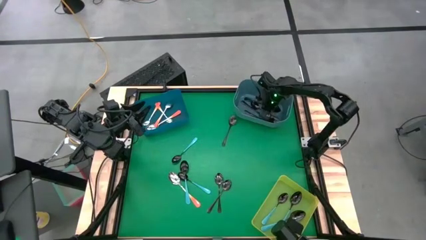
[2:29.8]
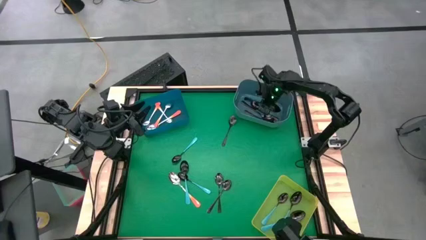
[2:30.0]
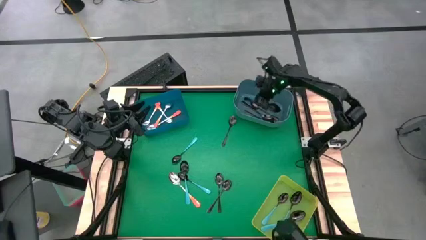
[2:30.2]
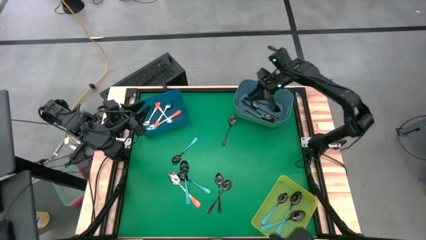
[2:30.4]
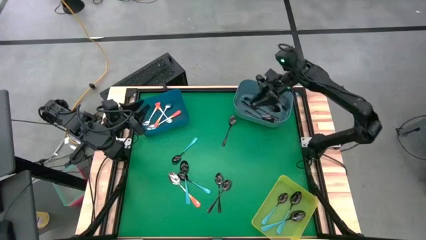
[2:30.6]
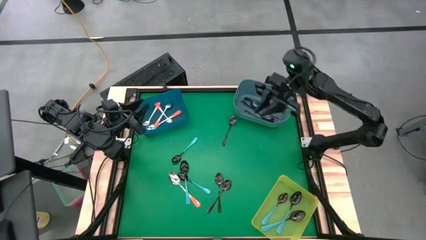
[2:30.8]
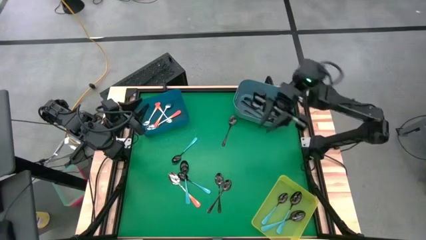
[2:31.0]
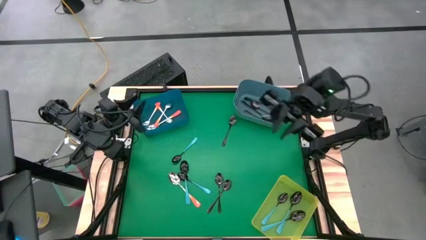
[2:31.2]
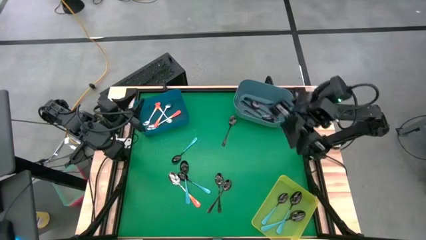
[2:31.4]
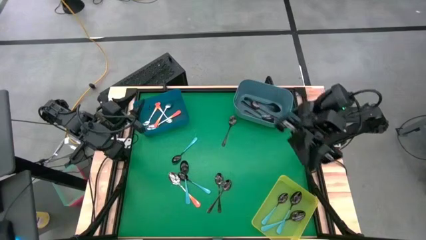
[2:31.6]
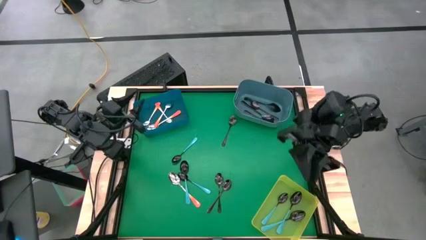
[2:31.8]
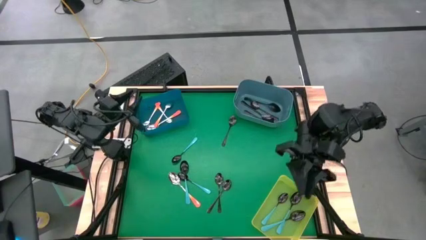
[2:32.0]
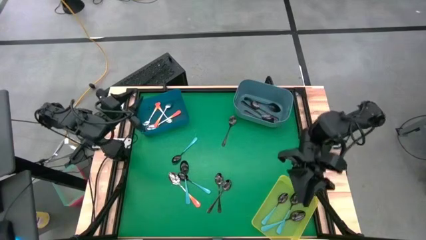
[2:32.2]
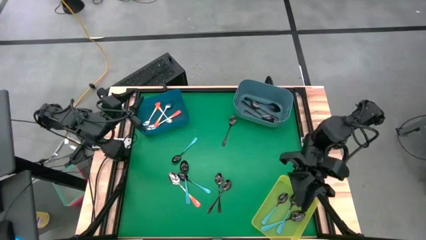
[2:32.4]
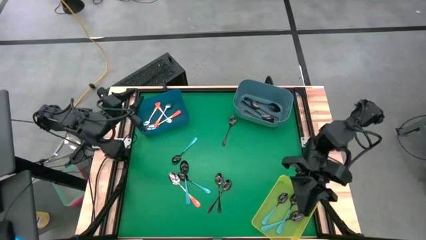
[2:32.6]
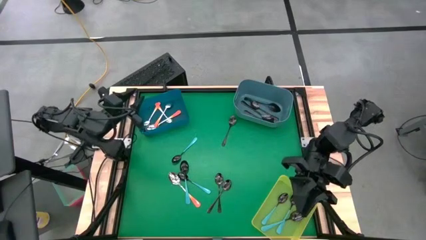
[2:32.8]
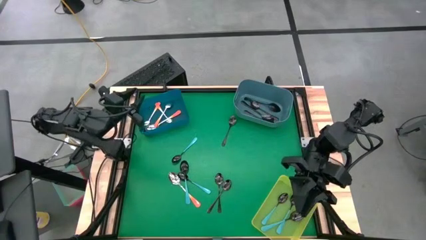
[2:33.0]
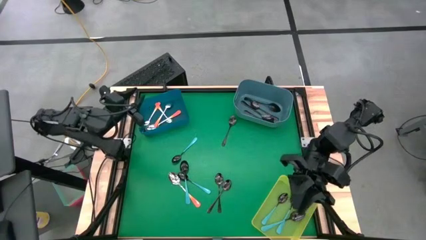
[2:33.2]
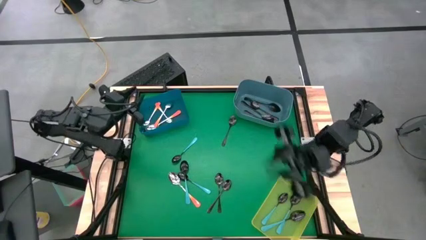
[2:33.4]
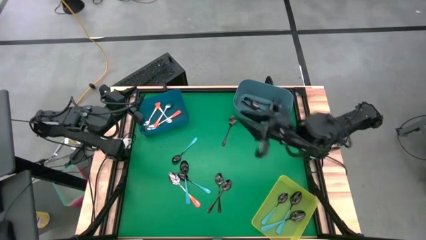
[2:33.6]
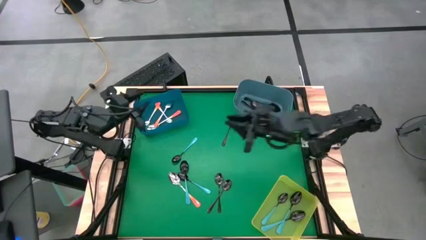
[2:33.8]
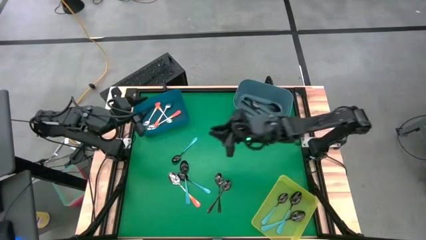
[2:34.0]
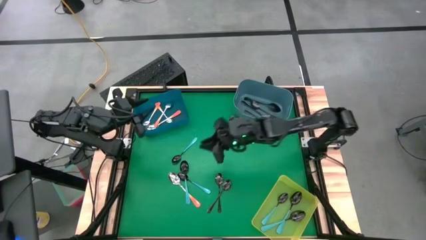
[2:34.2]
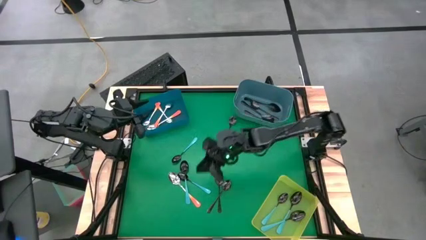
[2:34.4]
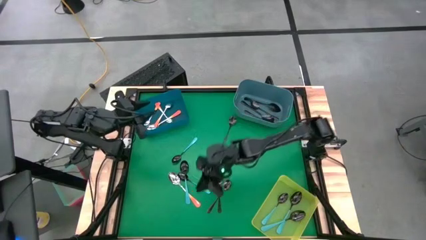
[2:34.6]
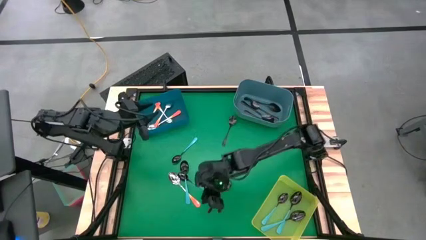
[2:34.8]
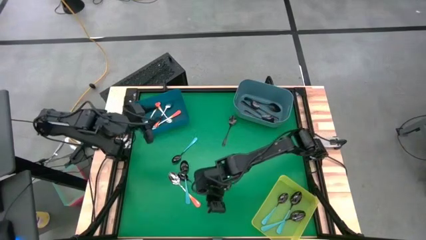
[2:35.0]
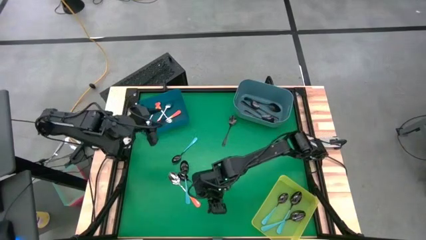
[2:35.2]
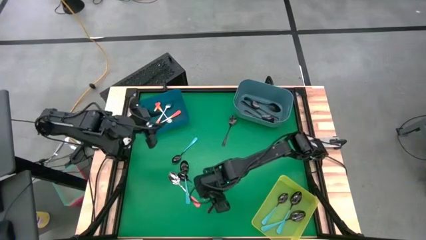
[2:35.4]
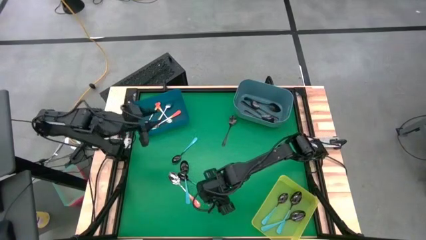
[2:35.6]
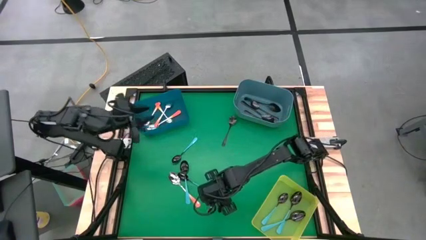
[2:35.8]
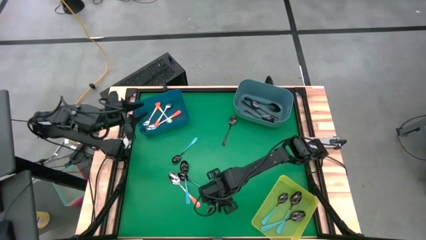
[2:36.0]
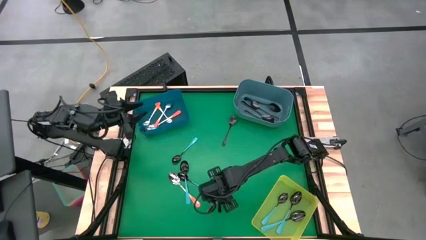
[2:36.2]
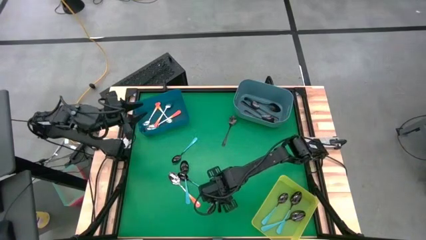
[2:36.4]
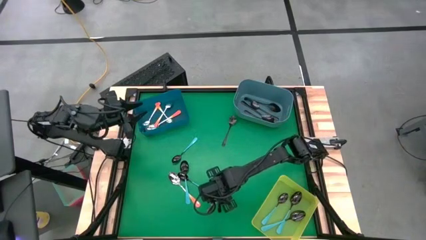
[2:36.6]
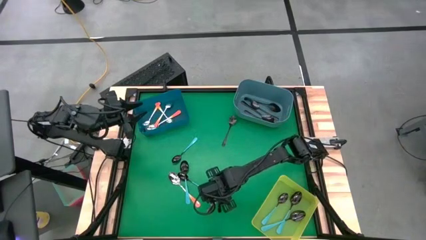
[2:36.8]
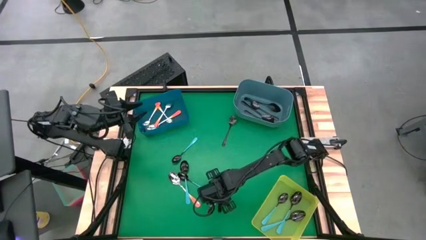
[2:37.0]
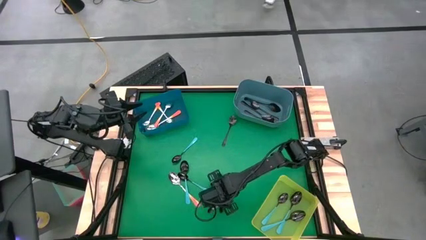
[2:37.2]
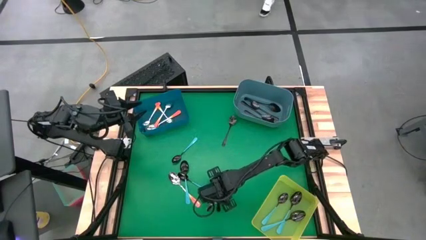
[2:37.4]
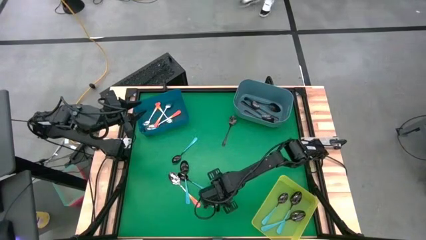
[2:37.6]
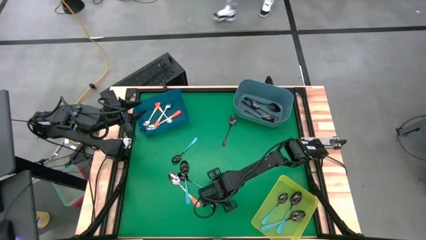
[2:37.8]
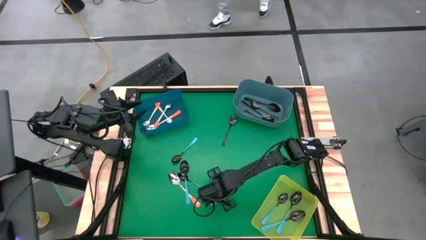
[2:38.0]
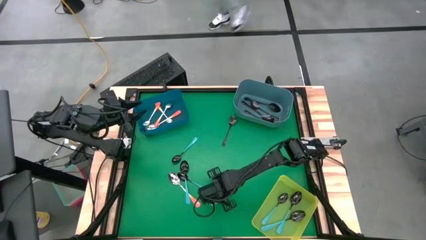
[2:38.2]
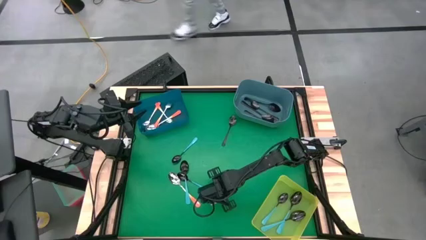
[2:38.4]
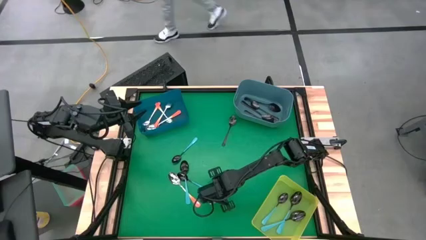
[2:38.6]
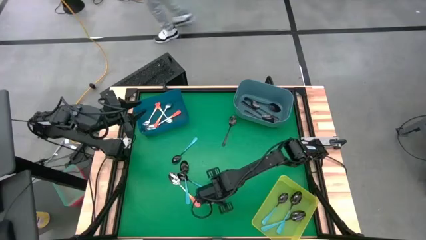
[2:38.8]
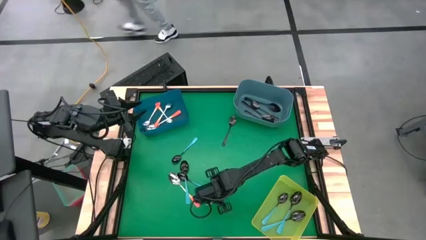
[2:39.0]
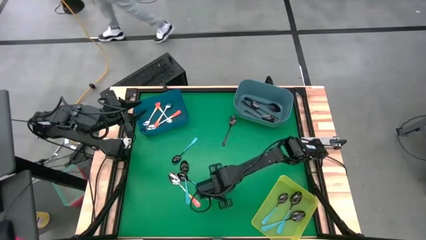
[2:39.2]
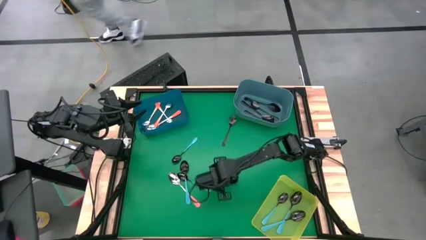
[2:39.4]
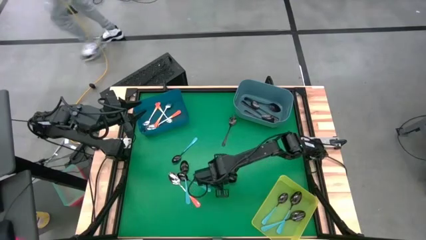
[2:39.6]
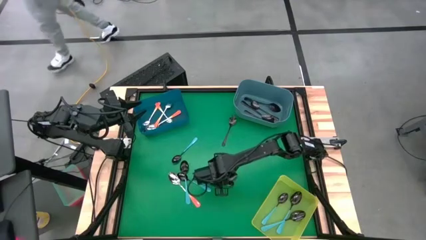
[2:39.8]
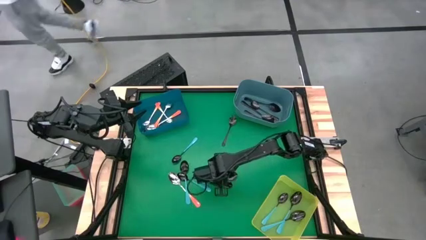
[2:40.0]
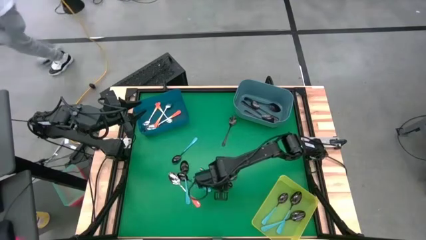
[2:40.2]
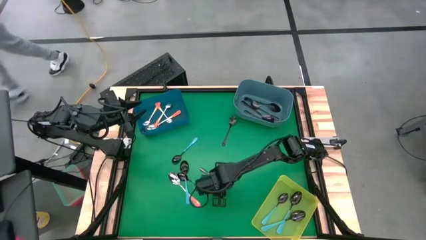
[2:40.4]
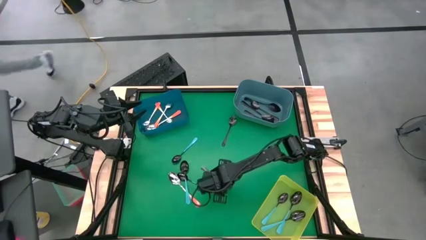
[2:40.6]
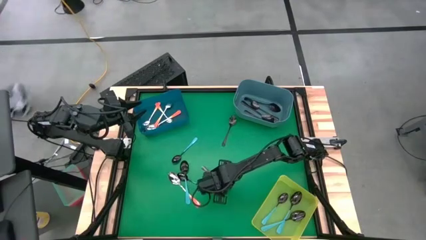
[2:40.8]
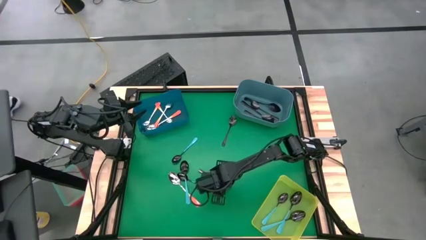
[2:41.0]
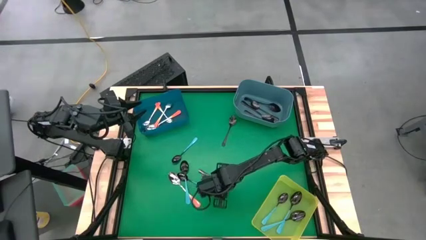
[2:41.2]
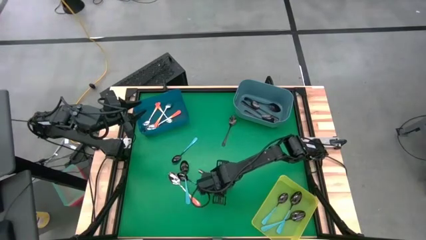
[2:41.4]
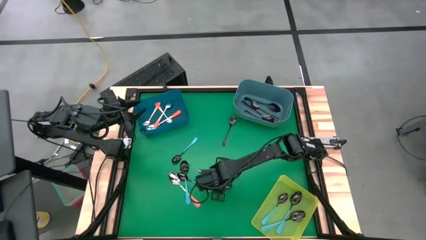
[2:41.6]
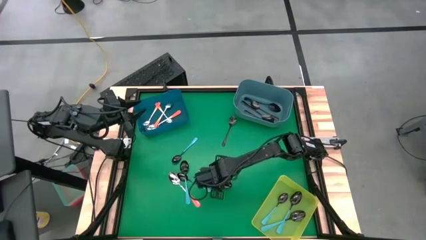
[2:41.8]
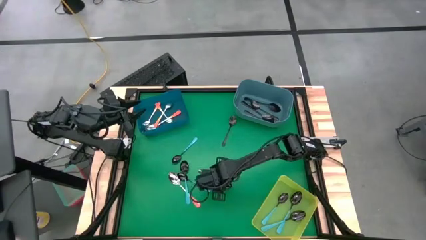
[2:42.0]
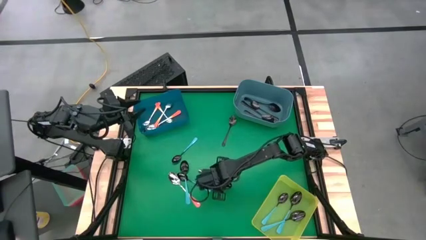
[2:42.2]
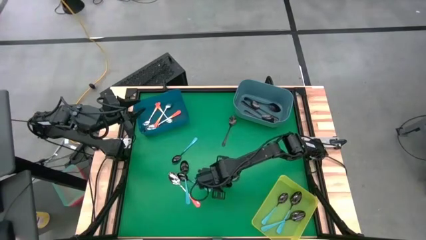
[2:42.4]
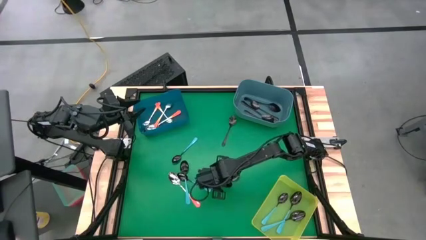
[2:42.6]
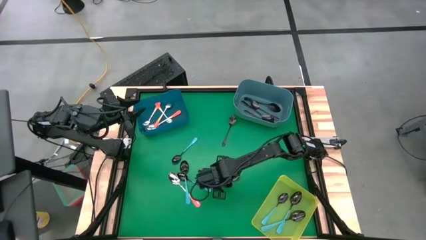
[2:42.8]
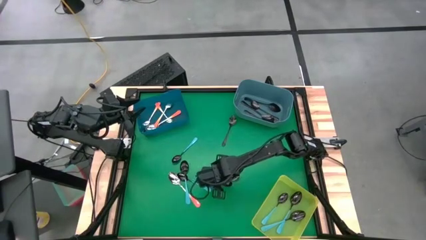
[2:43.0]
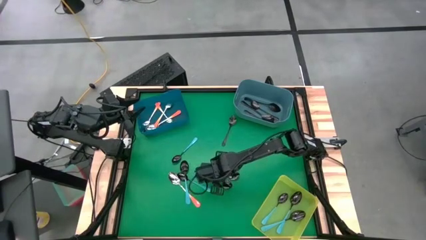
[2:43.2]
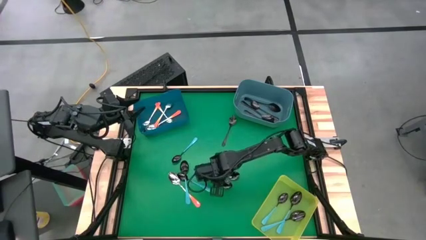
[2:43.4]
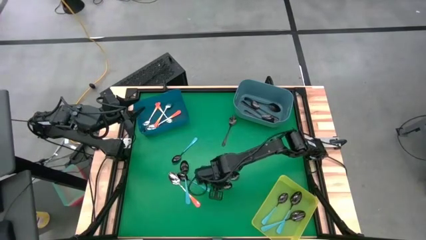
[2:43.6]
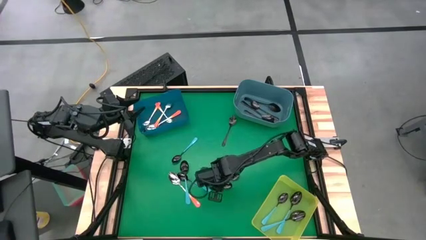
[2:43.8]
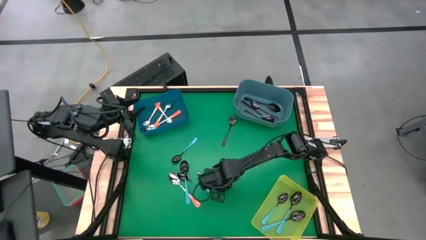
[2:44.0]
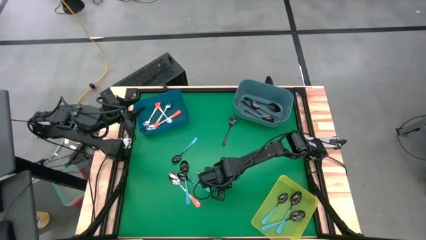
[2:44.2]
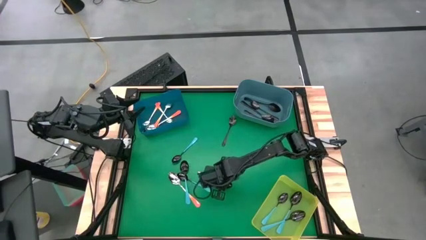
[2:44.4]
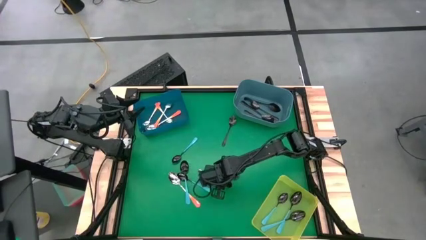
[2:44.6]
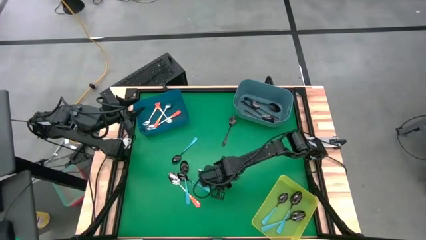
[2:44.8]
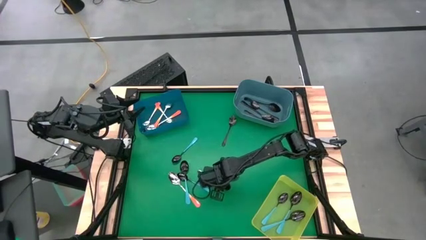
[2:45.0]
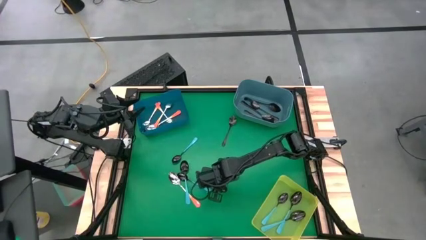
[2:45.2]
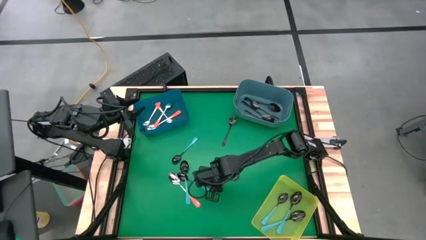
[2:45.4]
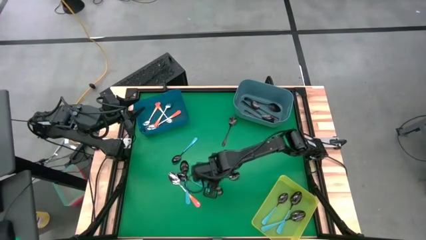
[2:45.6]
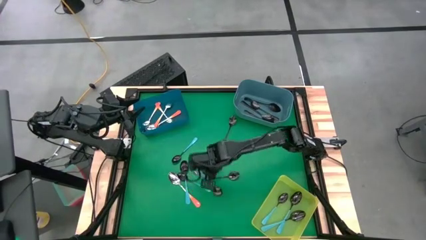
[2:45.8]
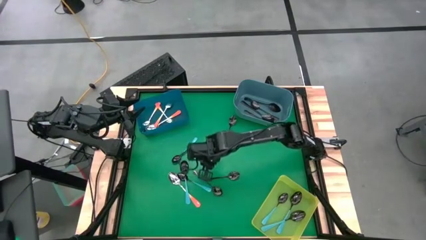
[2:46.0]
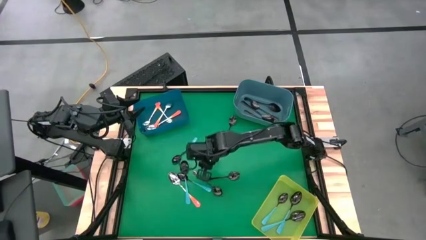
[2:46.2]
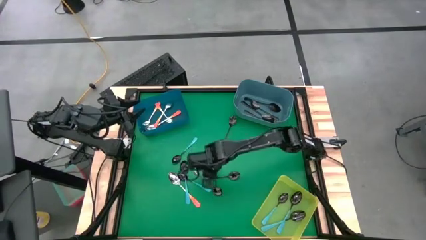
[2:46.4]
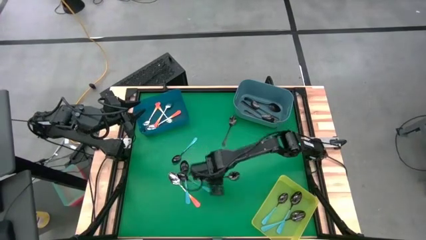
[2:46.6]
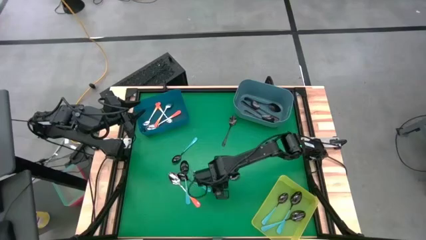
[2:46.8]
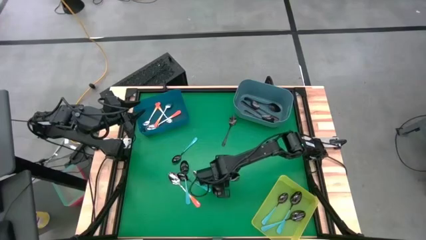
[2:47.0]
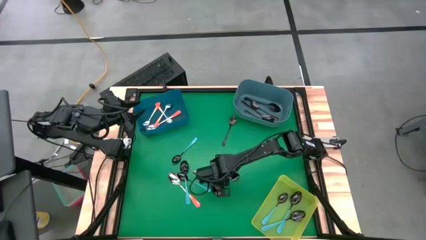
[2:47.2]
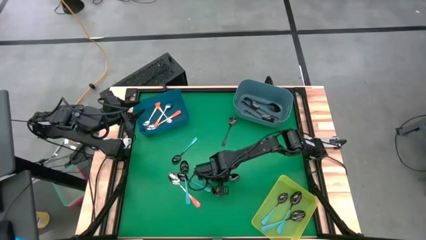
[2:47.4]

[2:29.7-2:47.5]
Task: Sort silverware by color (type)
Put the black spoon into the blue bin
